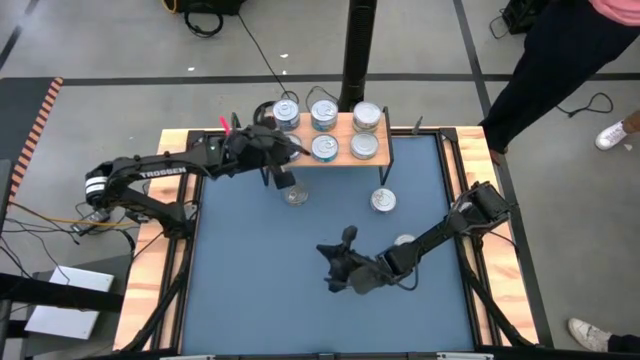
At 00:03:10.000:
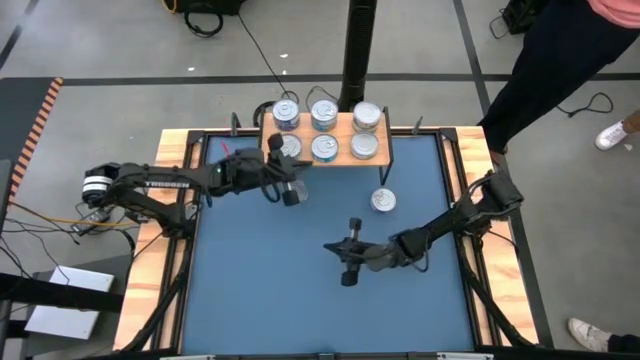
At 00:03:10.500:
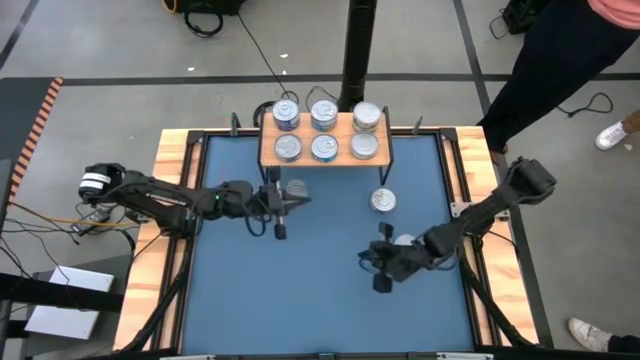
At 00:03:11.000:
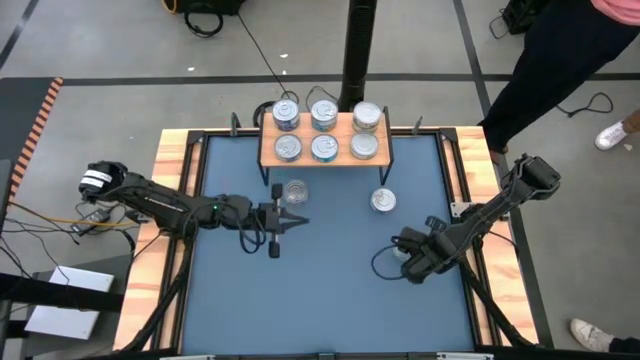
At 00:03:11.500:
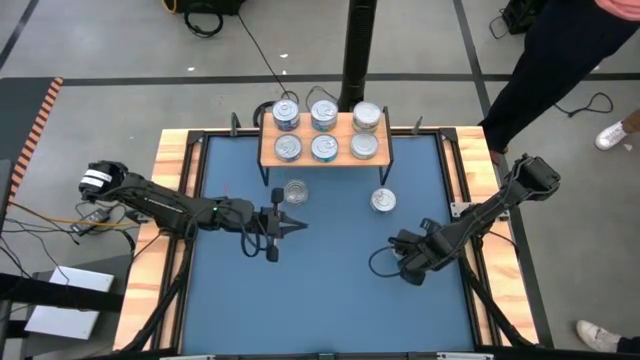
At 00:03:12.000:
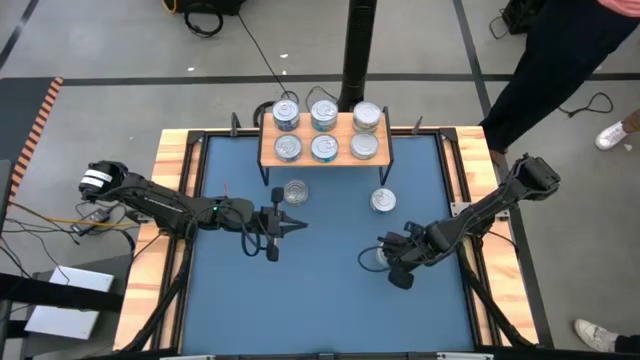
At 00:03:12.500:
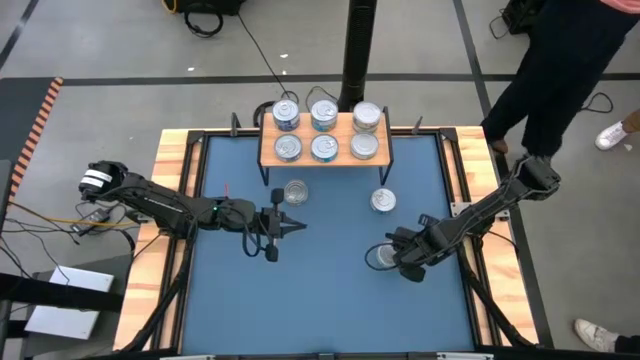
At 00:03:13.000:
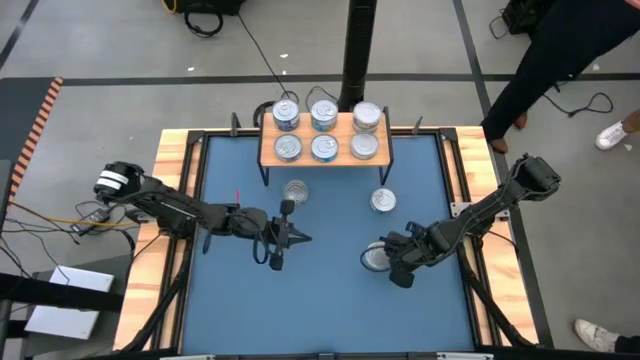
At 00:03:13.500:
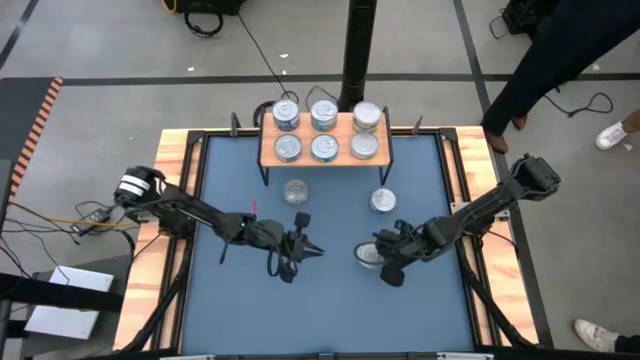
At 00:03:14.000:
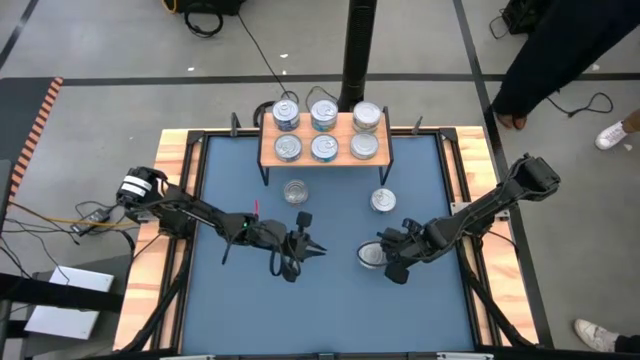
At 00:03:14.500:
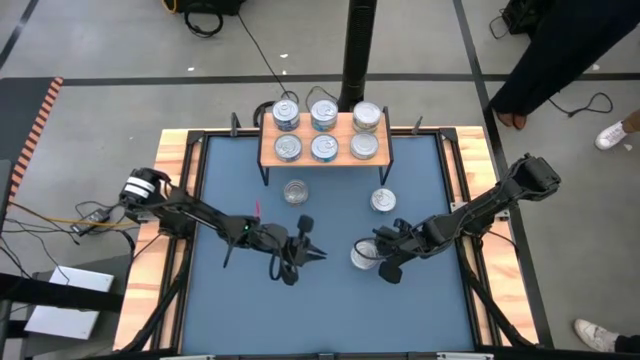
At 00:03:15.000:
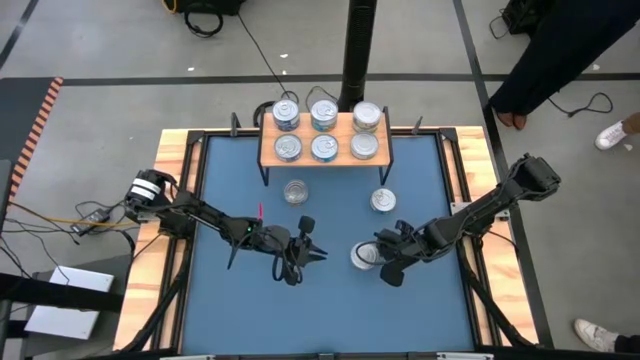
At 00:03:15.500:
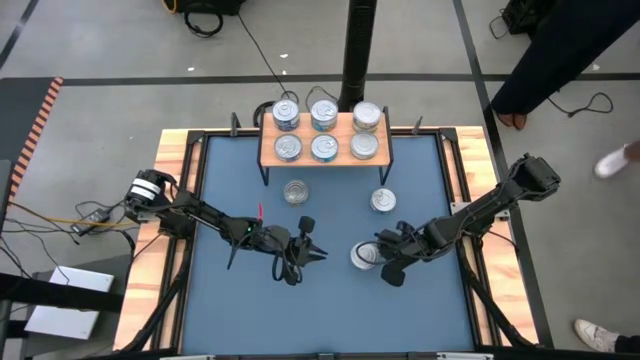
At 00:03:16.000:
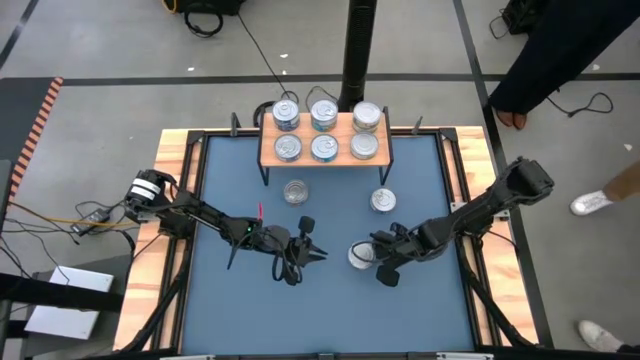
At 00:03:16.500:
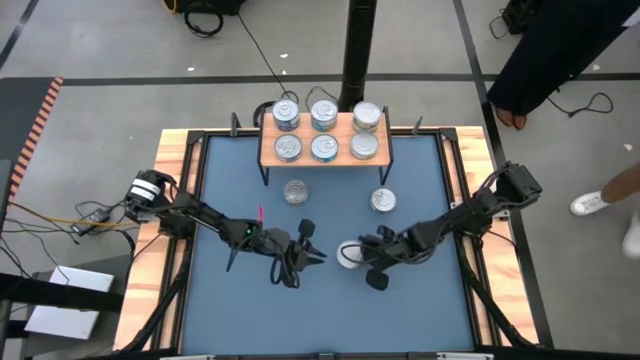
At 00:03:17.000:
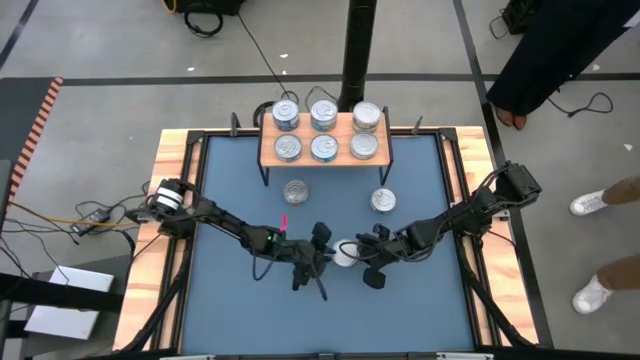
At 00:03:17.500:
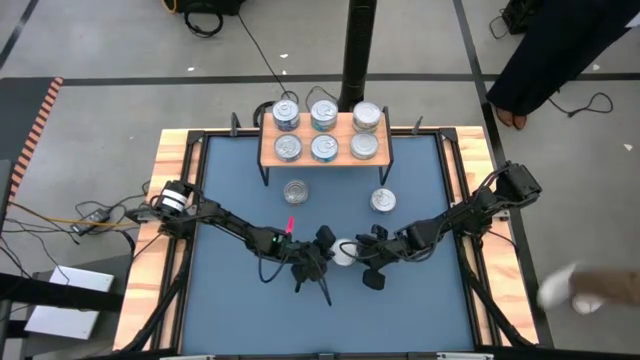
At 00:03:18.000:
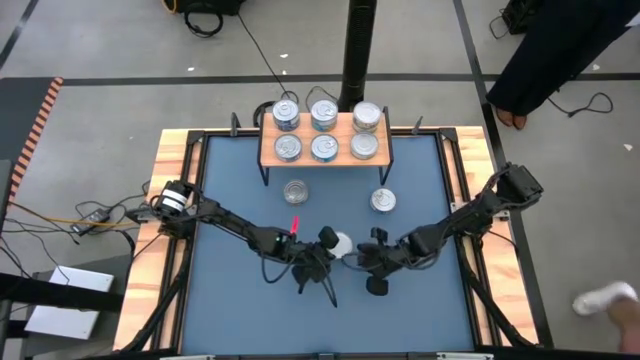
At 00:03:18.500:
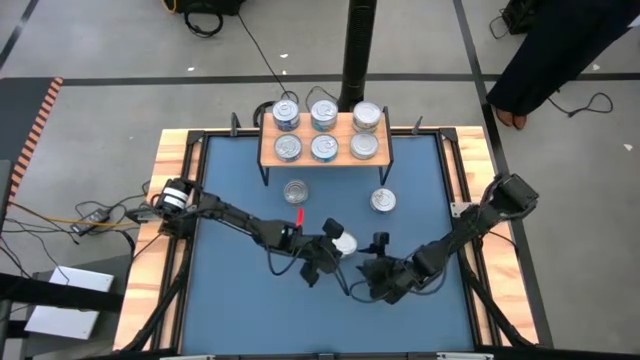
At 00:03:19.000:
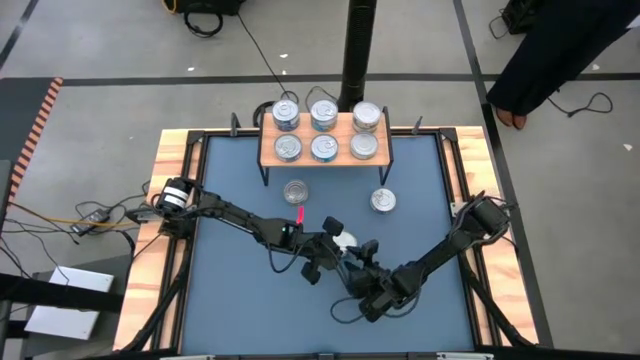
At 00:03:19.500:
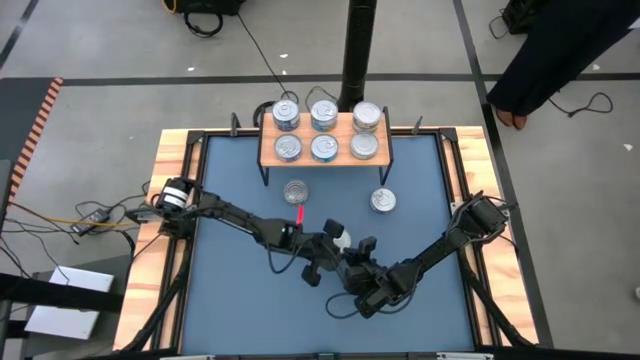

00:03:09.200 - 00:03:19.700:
Task: Stack canned seafood by type on shelf
Stack the green tuna can on top of the green tuna can on the shelf

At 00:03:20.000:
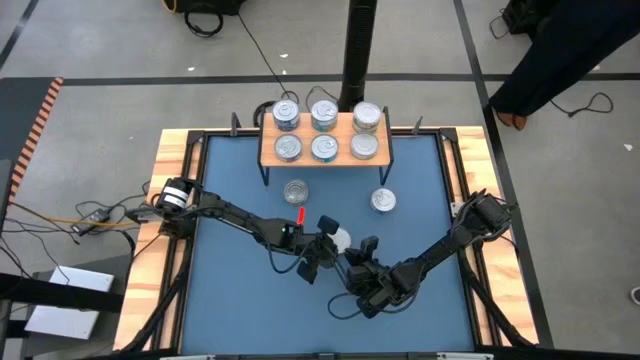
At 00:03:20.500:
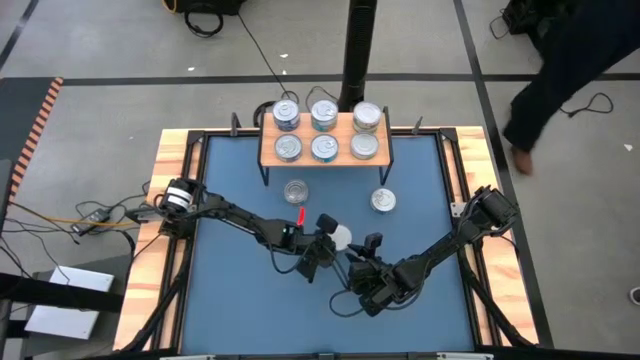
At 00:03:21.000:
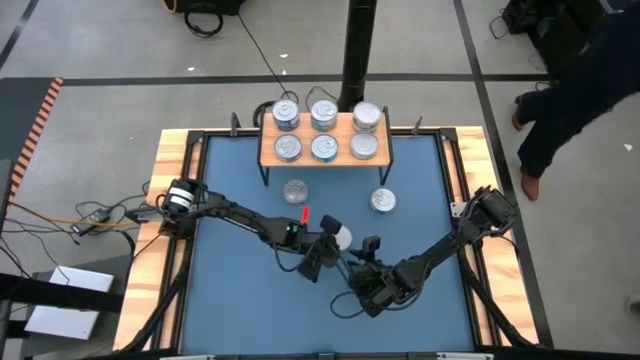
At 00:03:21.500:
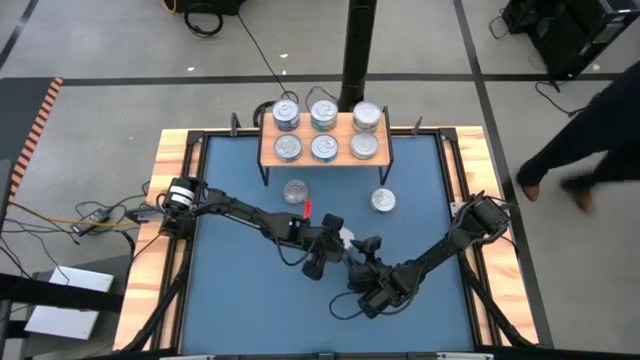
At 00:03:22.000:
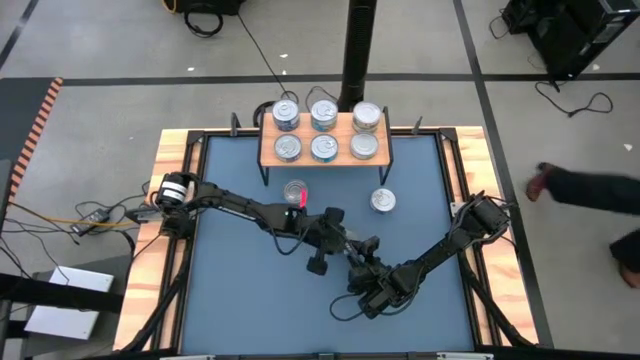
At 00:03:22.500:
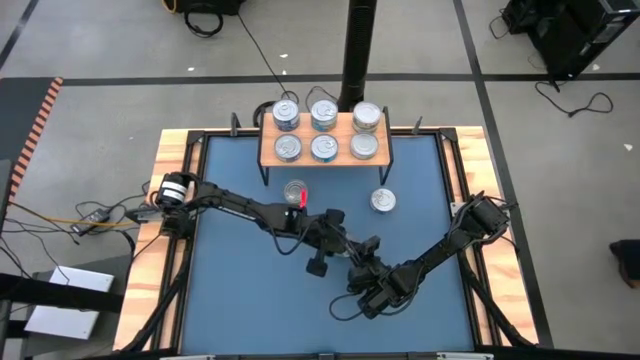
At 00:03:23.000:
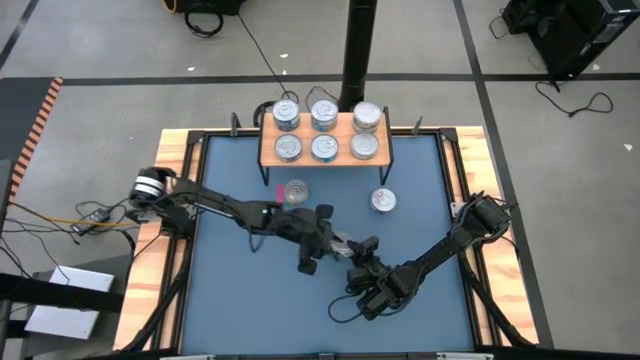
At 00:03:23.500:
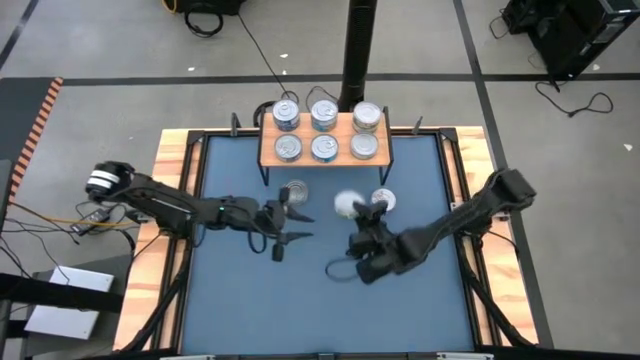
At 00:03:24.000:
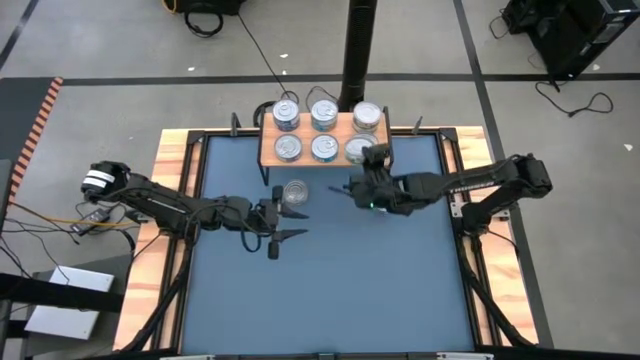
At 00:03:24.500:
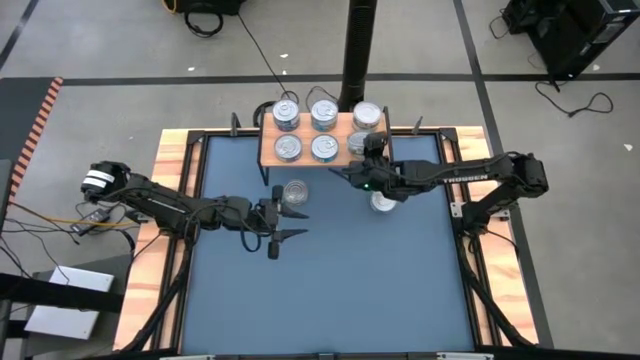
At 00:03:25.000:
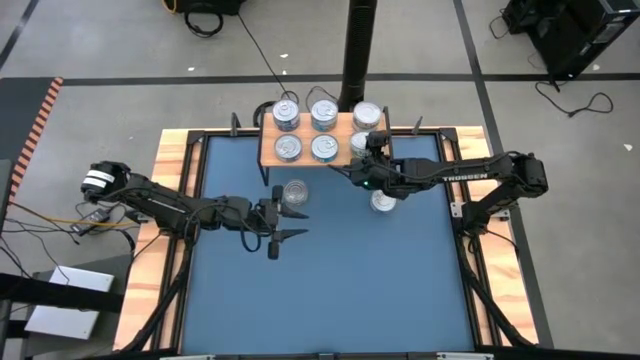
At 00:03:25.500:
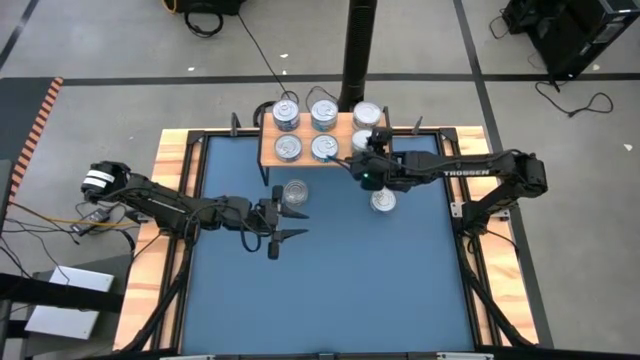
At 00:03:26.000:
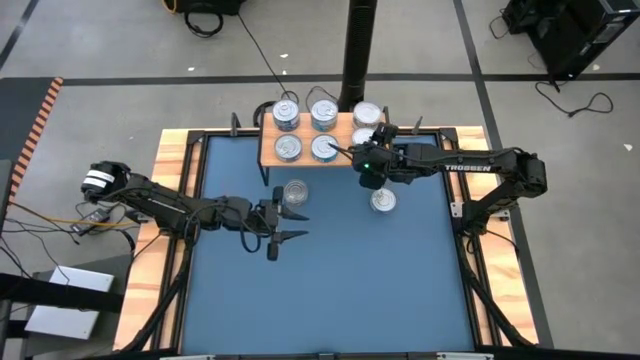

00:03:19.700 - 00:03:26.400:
Stack the green tuna can on top of the green tuna can on the shelf

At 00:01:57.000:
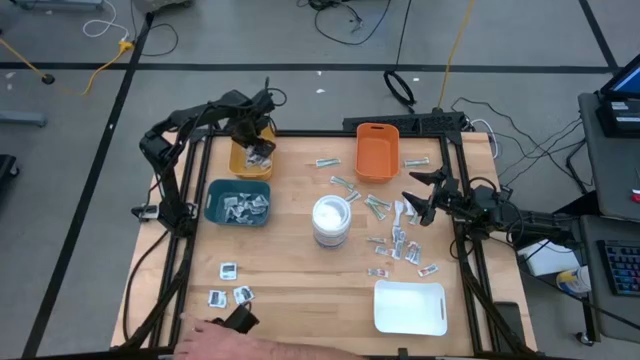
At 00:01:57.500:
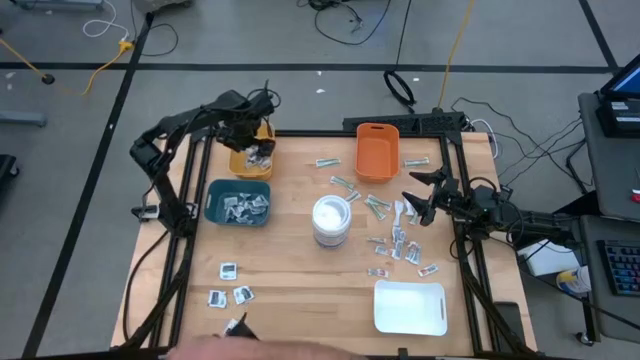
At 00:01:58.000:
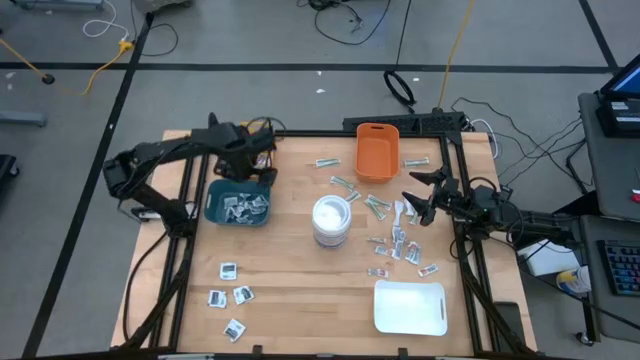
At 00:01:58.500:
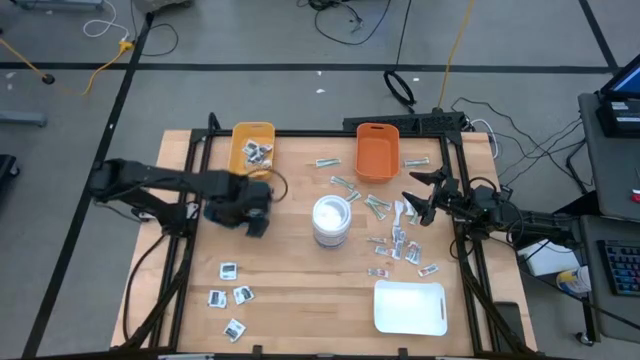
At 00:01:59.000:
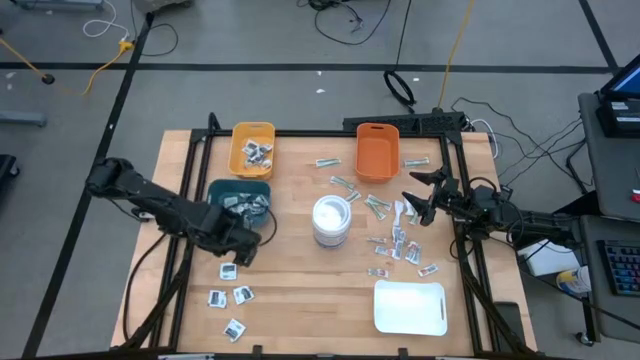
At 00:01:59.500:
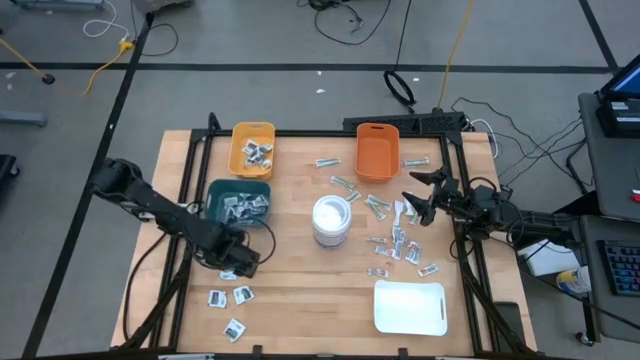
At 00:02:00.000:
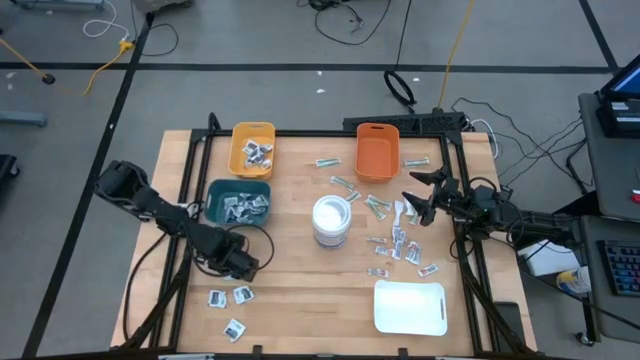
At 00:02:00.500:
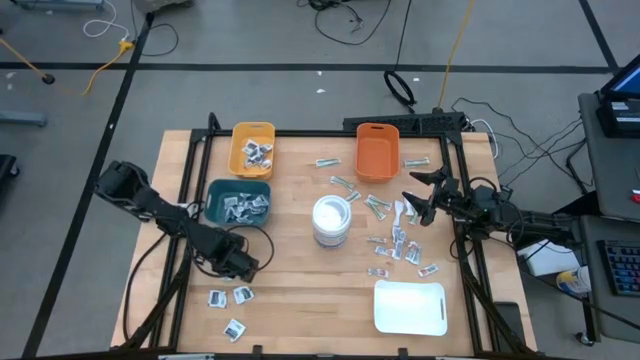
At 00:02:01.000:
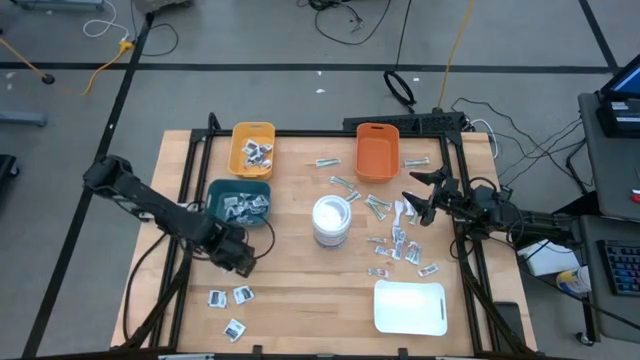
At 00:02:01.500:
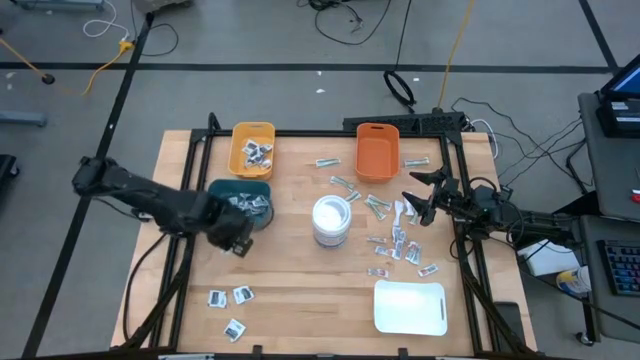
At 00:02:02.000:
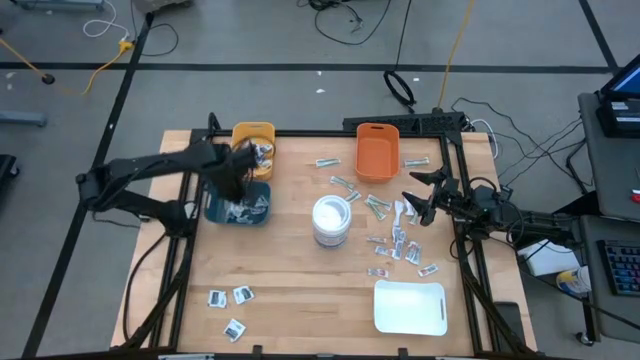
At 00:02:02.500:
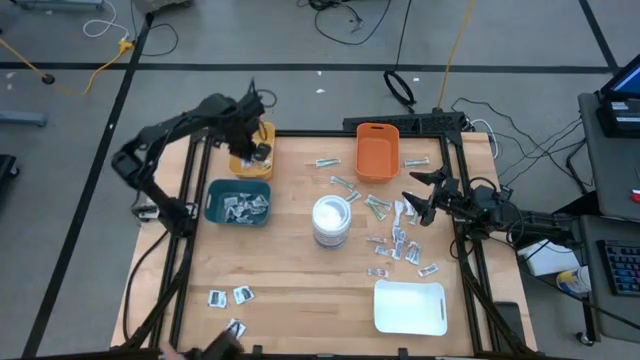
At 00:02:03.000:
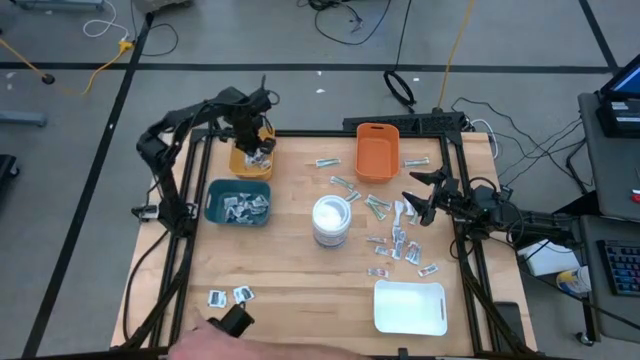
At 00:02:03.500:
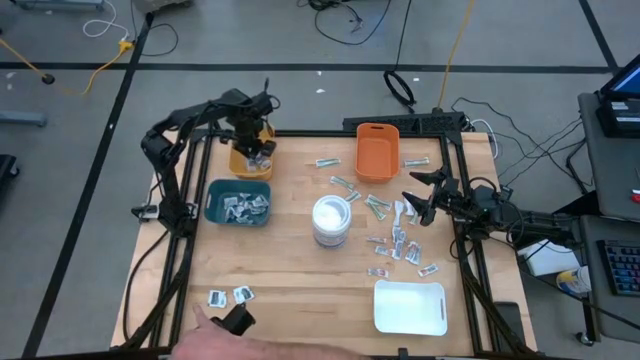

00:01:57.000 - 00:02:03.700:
Task: Pick & Place First Aid Supplies
Put the black pad into the yellow bin
